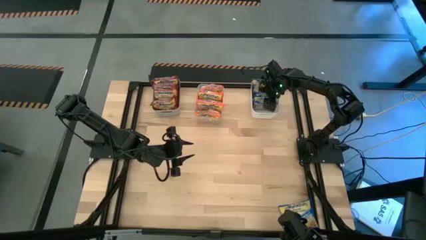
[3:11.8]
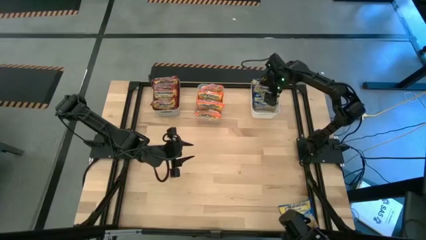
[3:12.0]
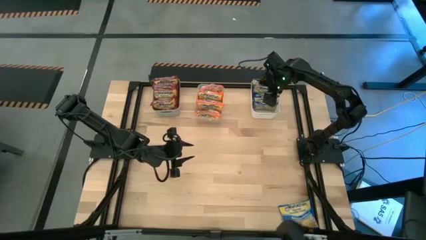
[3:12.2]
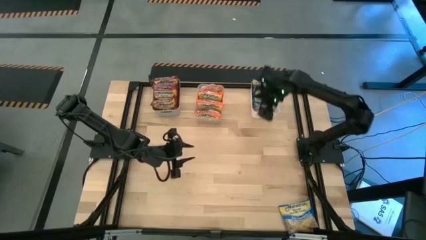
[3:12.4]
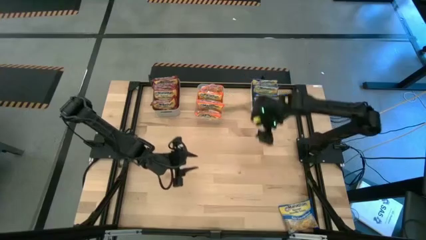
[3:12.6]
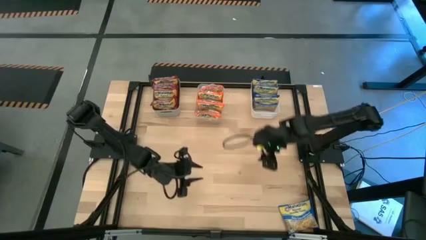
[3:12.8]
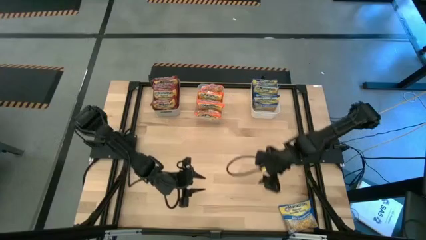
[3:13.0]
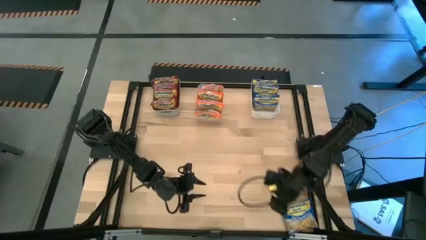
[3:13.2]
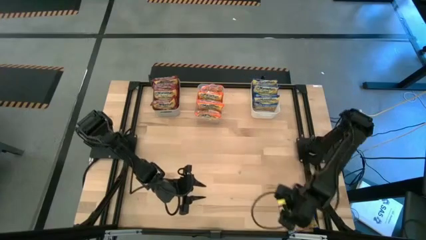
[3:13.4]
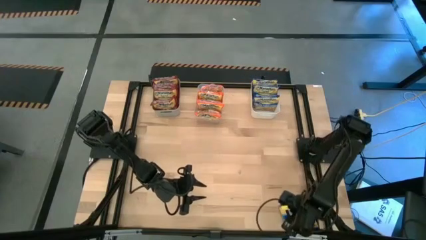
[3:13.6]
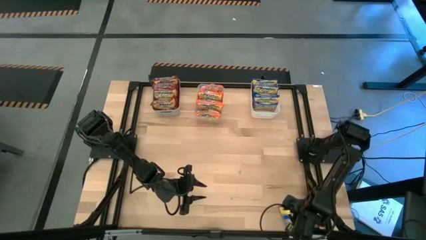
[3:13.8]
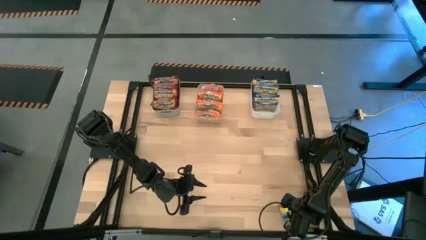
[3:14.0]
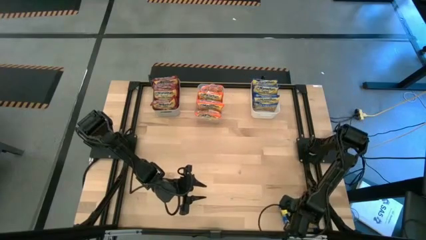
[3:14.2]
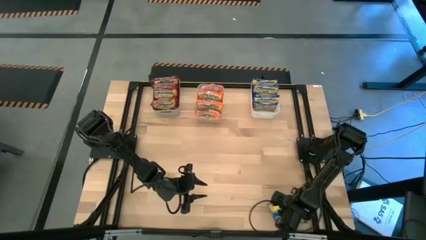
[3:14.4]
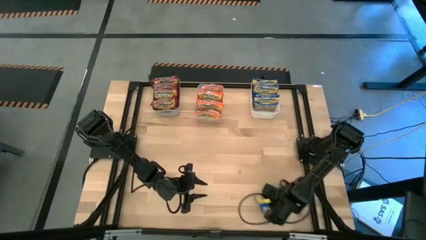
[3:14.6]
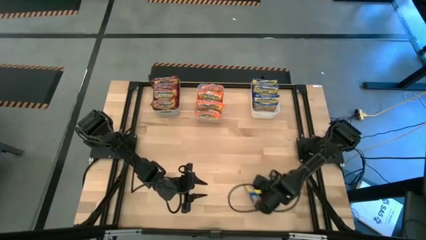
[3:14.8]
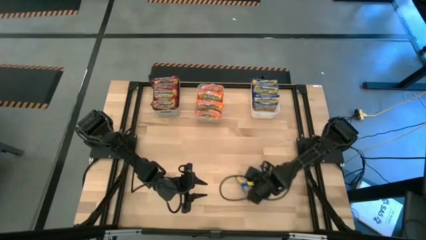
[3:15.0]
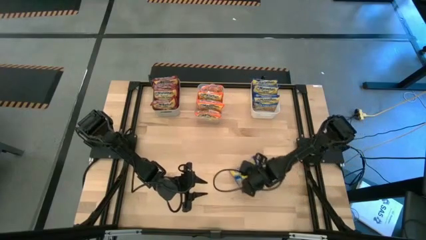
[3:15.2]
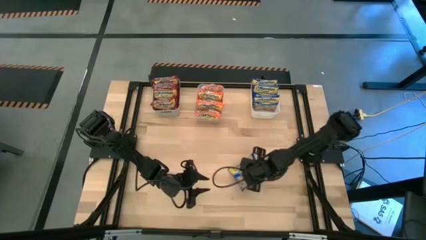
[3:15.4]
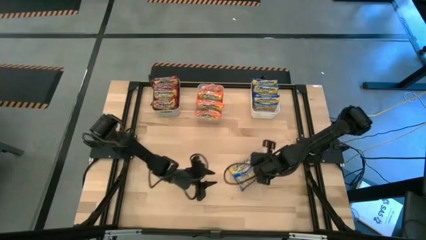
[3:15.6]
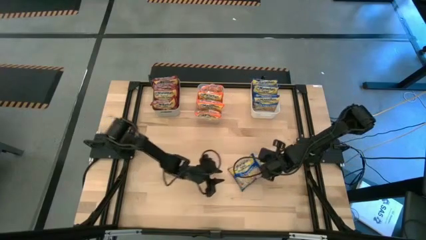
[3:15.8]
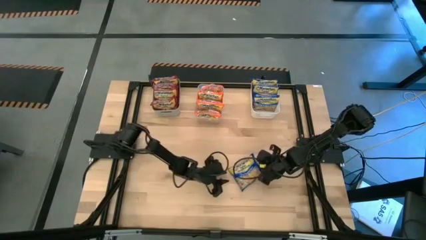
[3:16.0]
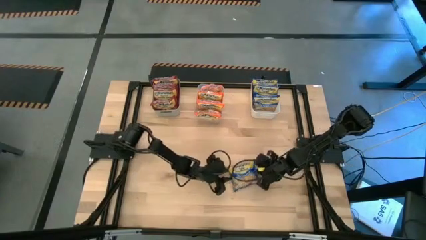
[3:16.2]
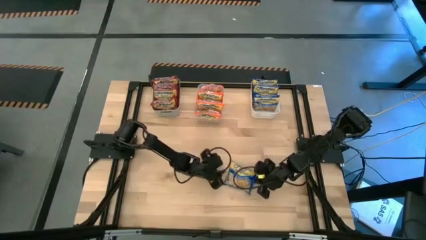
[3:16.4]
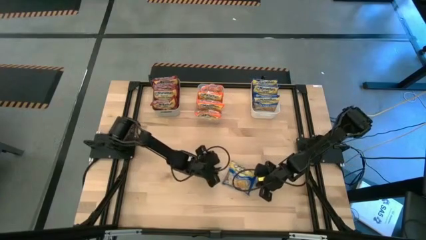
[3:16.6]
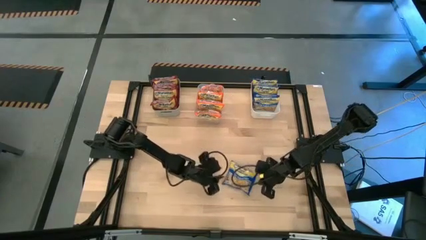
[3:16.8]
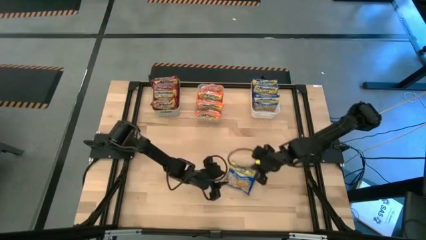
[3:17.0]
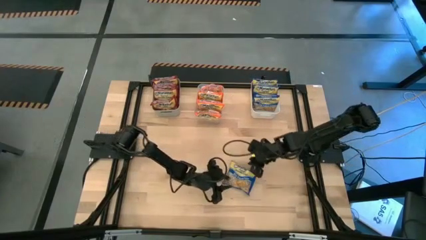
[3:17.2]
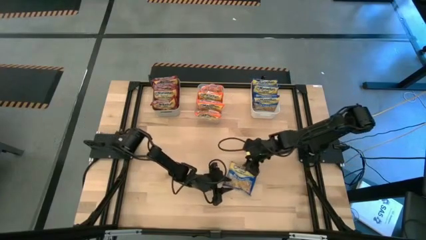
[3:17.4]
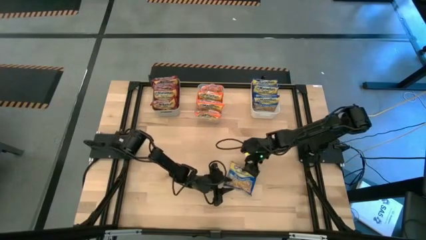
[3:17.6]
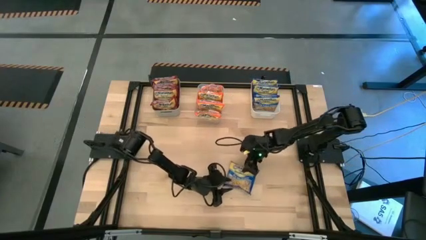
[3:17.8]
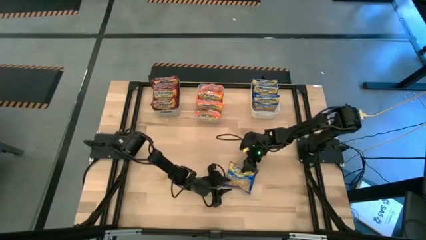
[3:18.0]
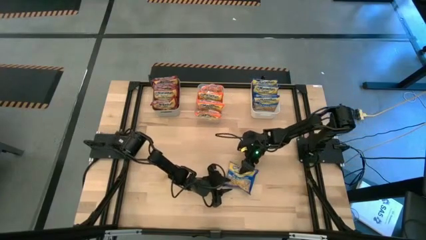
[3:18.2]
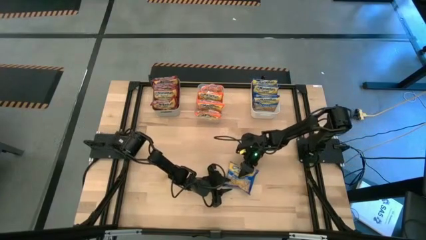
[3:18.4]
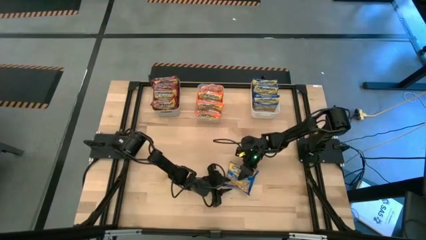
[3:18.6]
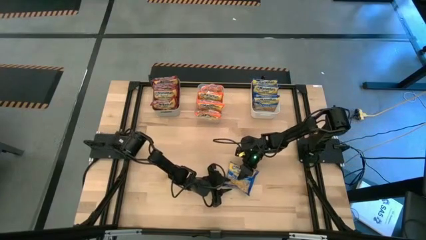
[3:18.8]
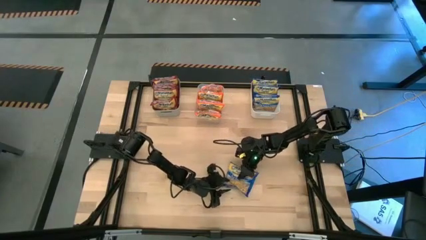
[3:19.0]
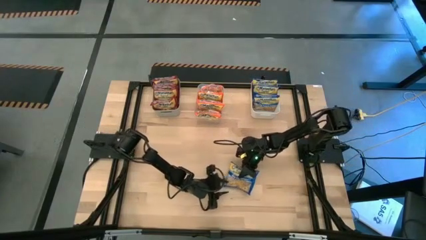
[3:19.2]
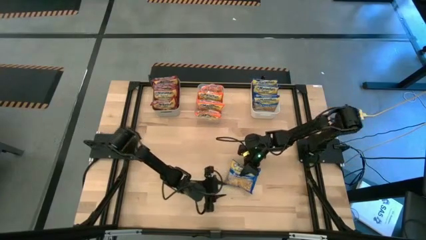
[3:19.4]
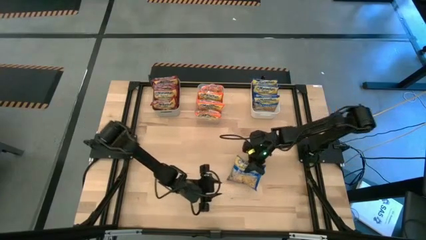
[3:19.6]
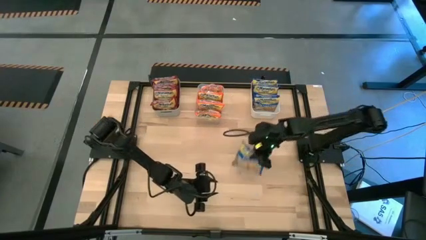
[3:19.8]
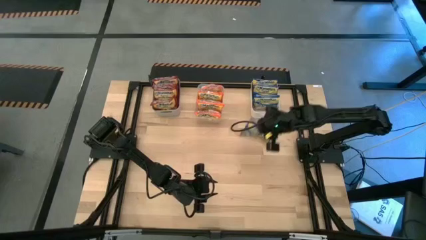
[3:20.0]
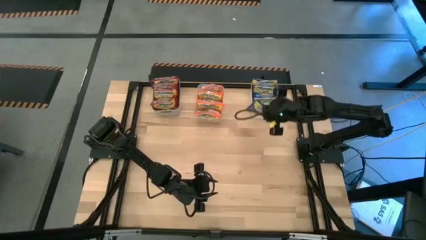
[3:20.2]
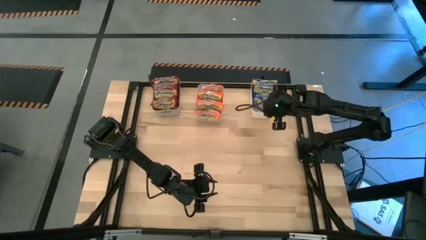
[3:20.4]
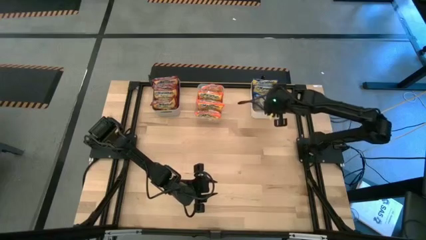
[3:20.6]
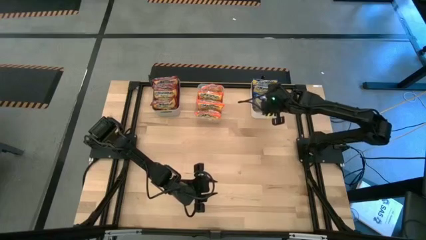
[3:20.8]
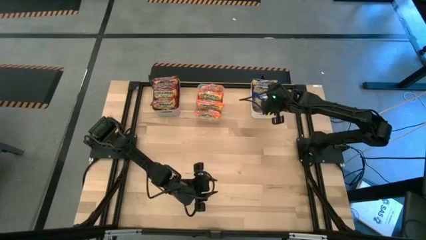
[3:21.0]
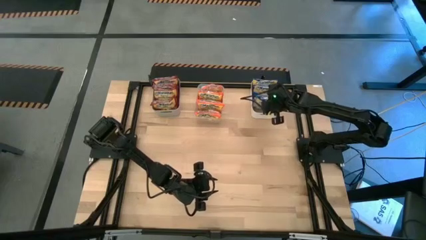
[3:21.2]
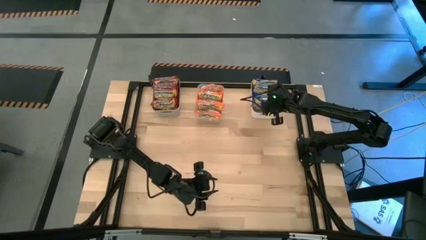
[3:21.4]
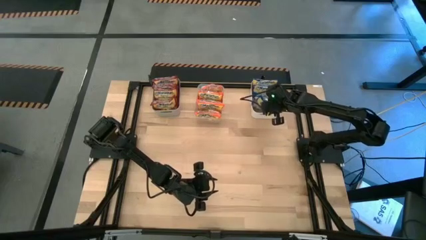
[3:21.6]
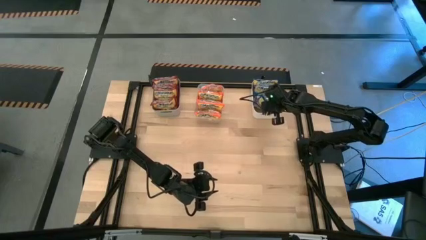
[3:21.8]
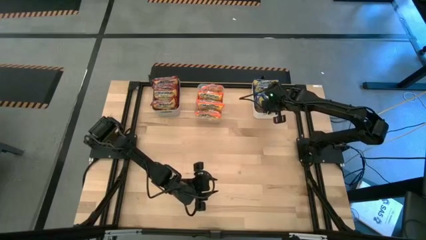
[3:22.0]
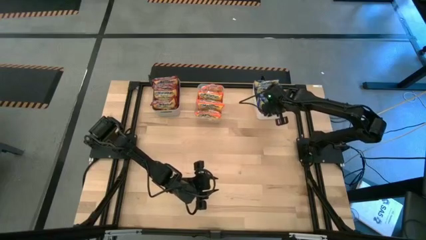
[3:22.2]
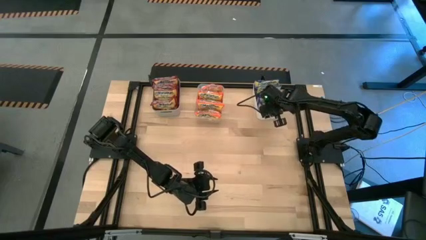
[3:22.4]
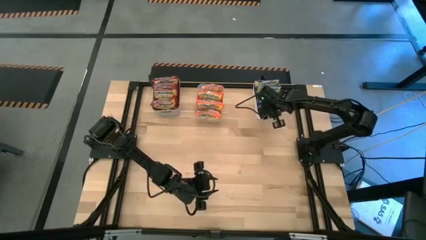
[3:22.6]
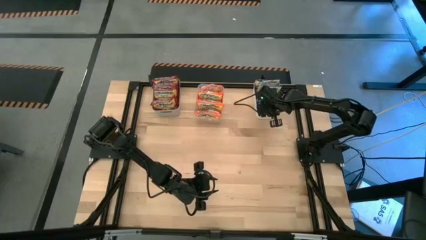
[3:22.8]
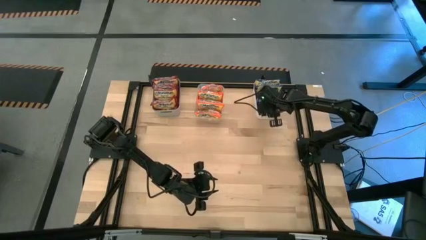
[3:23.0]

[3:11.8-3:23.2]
Task: Sort Maruchan noodles
Put the blue noodle into the white bin

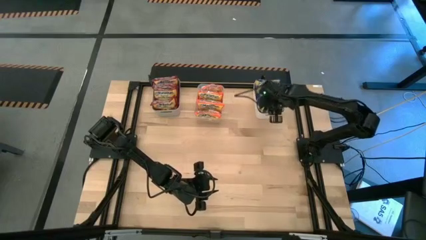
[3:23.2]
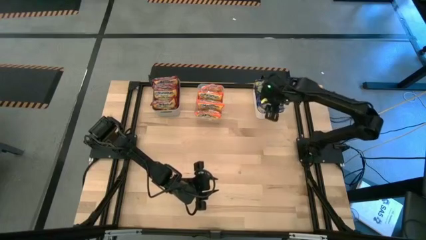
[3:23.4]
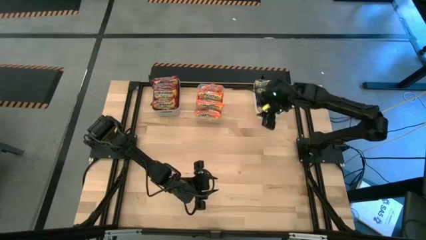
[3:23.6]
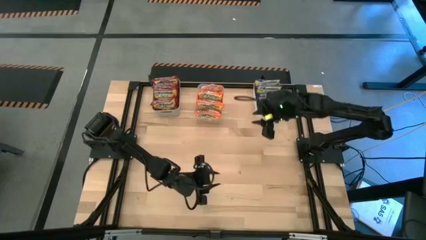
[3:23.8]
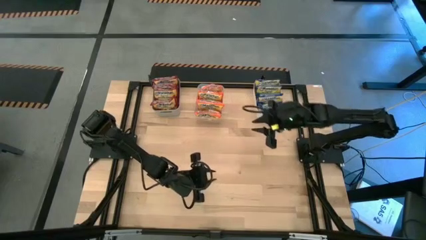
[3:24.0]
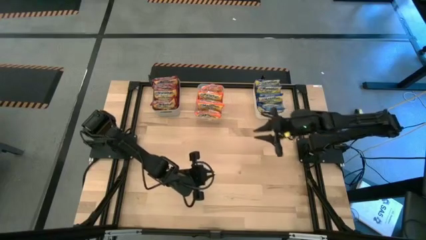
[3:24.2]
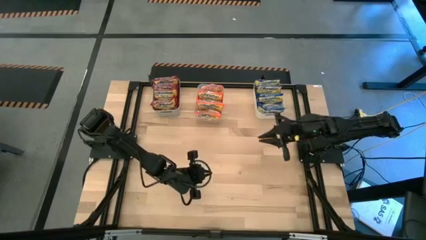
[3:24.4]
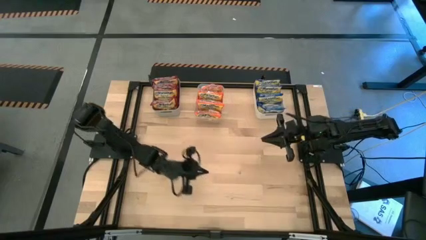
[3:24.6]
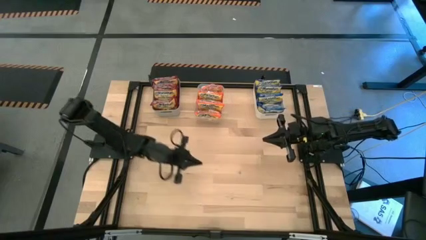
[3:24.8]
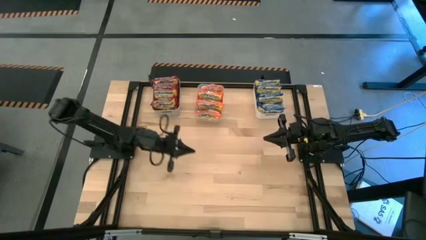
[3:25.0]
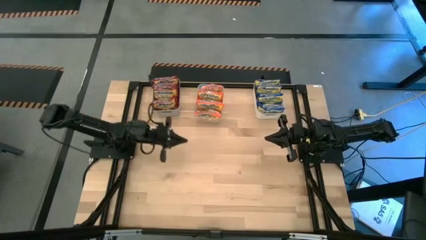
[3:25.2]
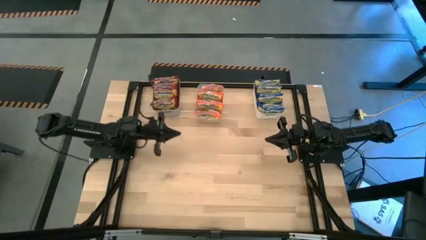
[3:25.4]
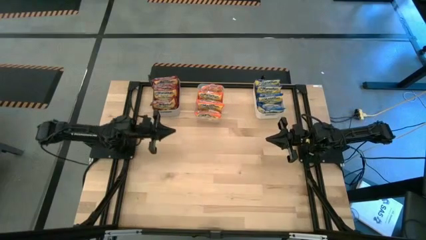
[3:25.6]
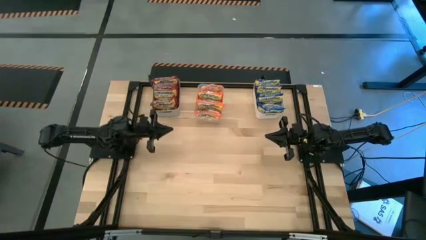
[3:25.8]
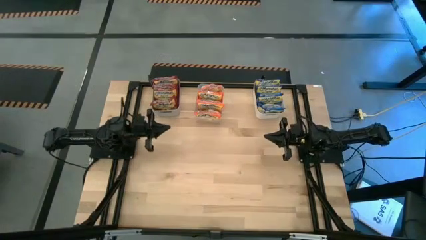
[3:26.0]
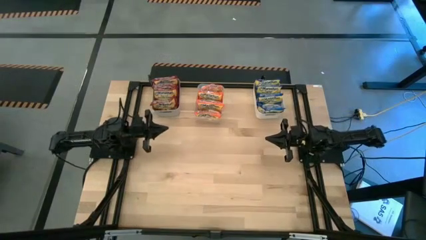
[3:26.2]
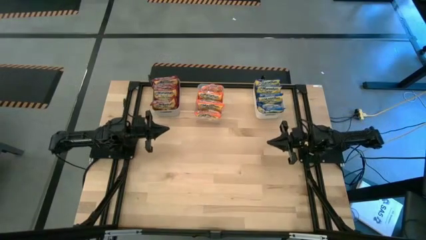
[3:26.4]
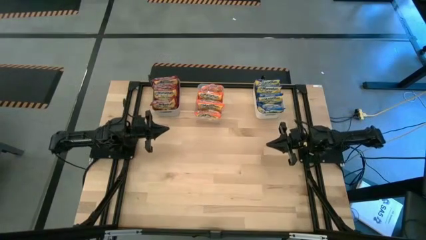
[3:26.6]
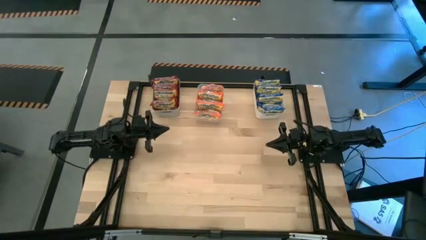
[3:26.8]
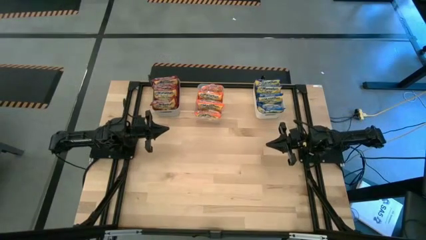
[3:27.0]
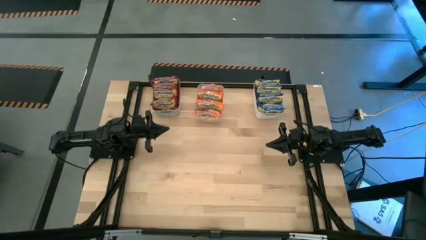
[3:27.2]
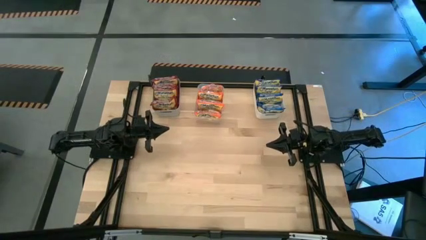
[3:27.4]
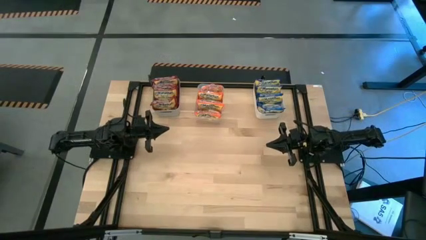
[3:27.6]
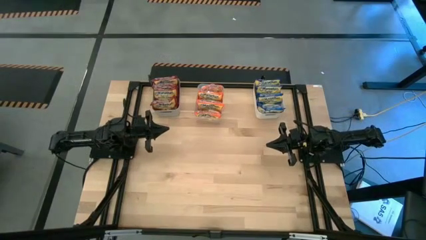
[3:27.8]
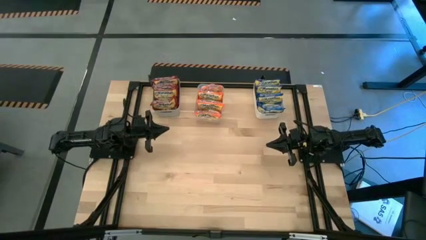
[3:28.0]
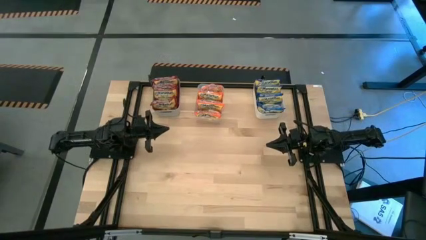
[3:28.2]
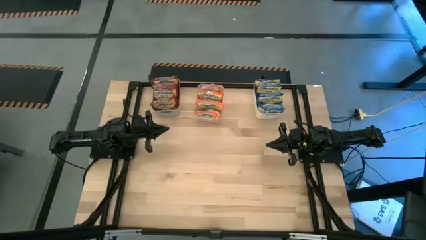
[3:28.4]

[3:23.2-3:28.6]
Return to Home Position
